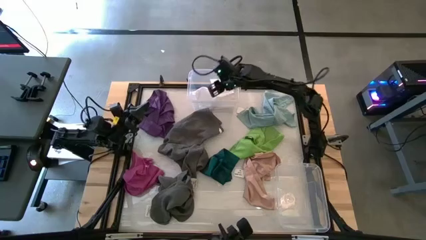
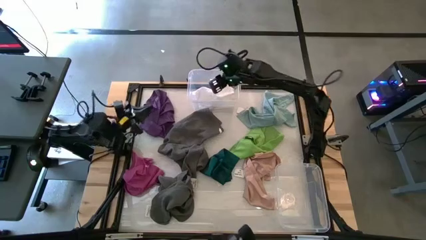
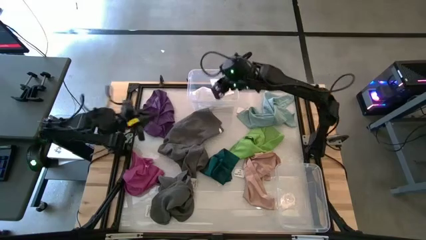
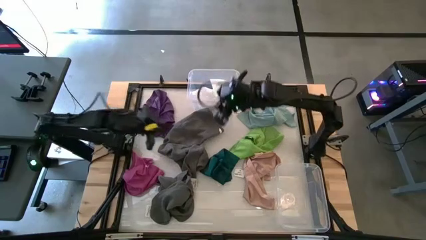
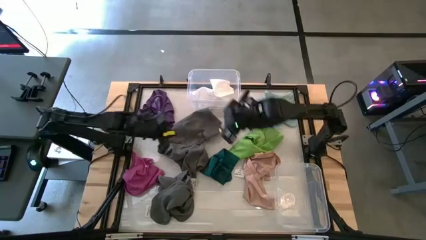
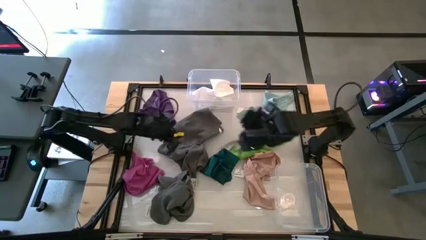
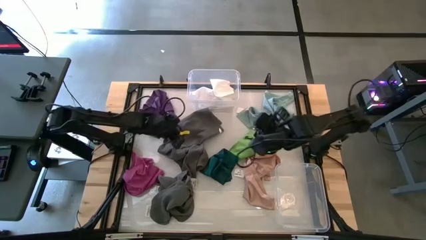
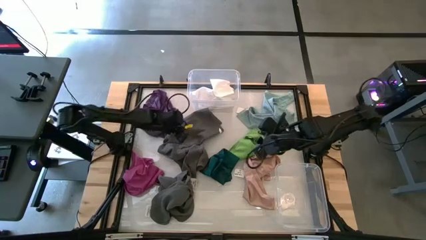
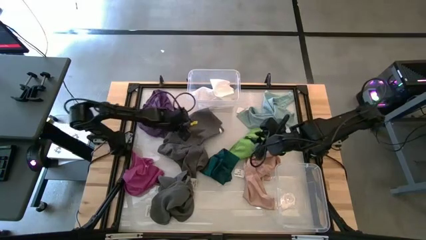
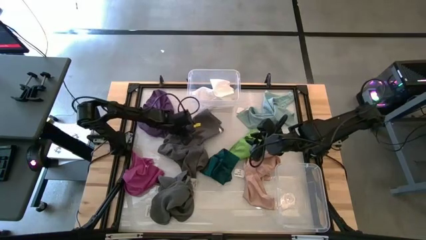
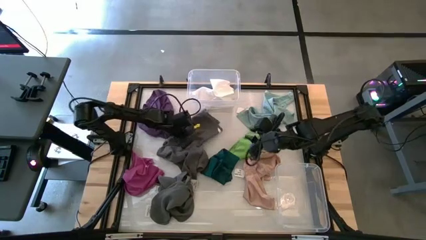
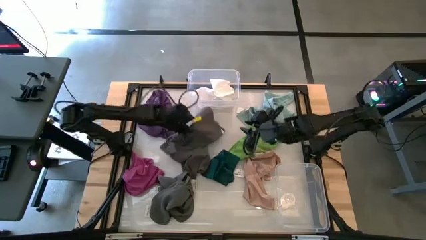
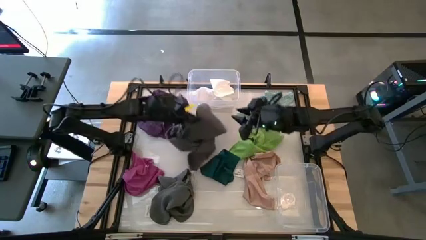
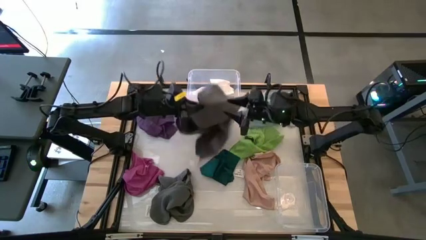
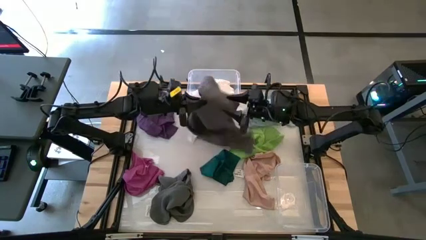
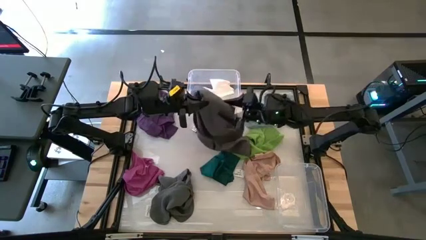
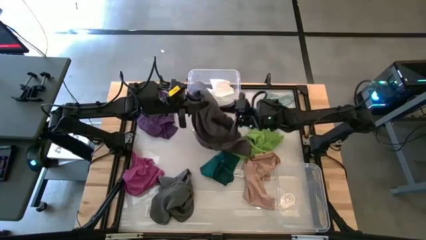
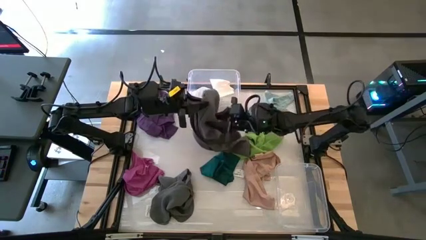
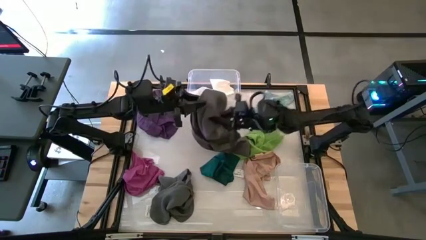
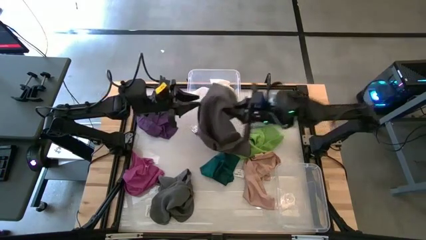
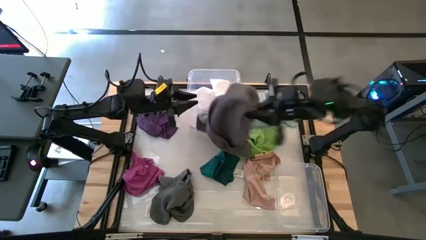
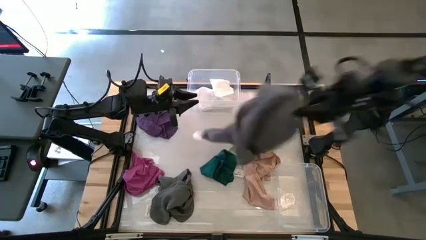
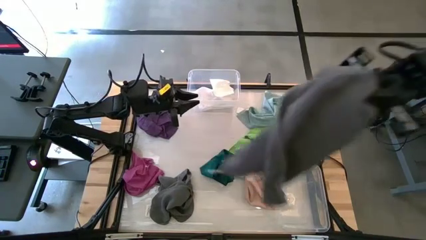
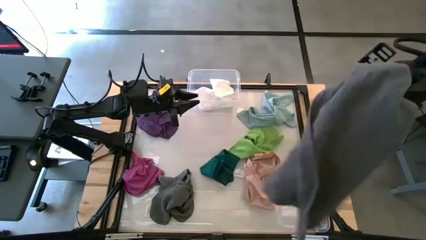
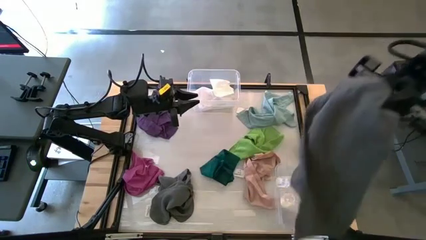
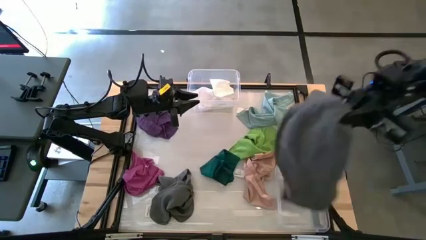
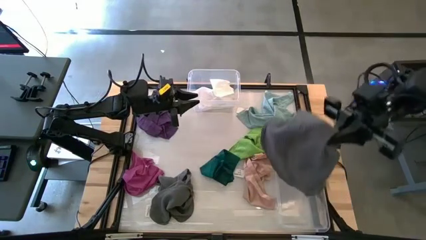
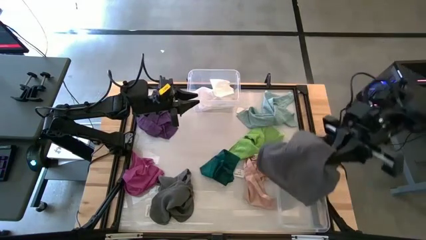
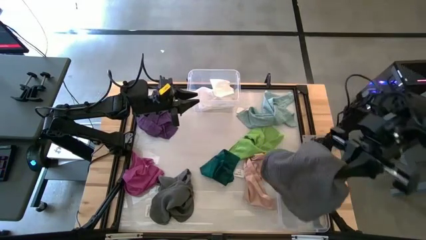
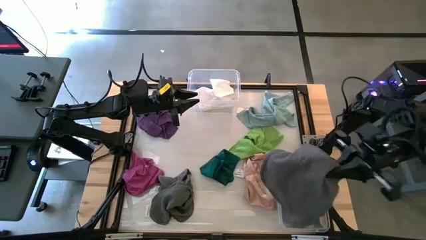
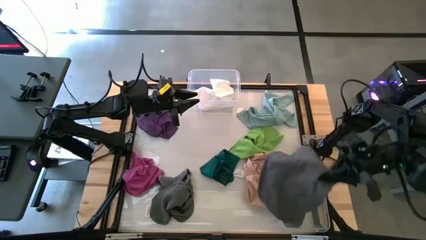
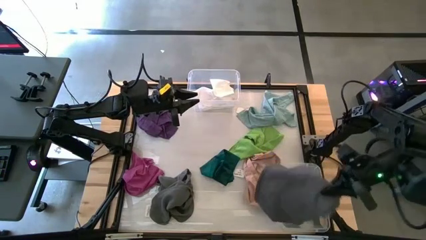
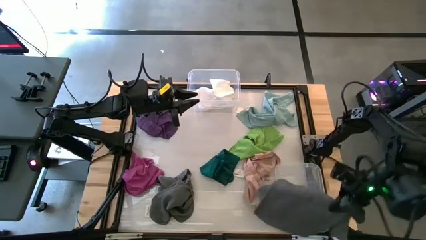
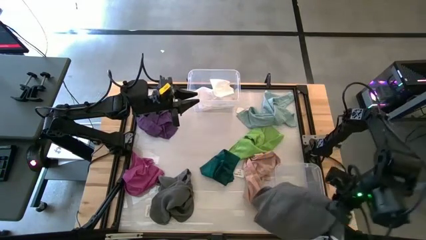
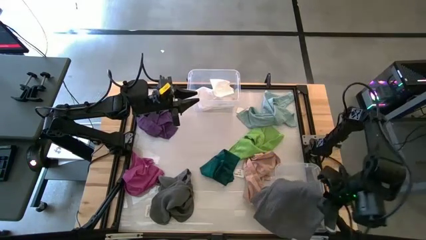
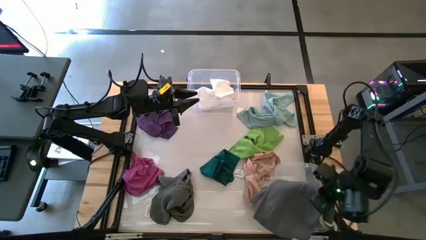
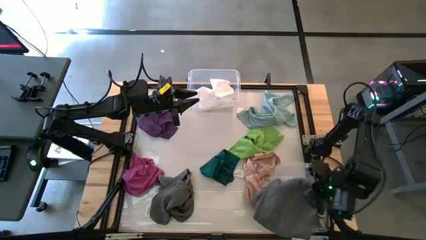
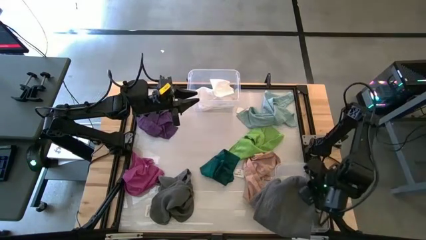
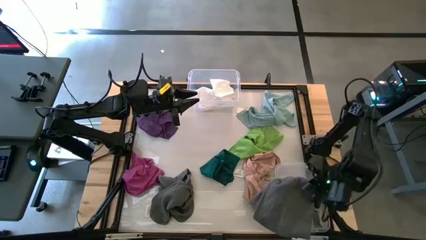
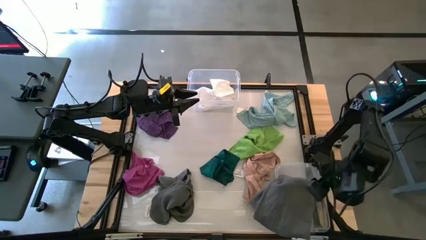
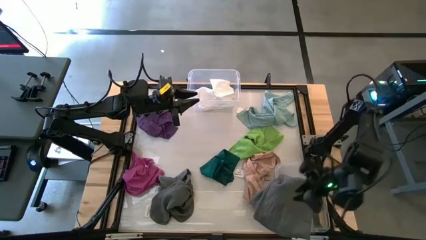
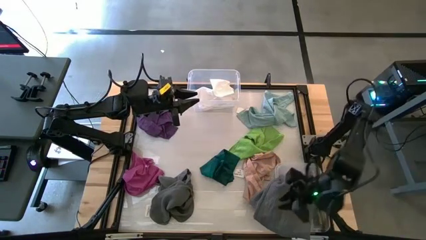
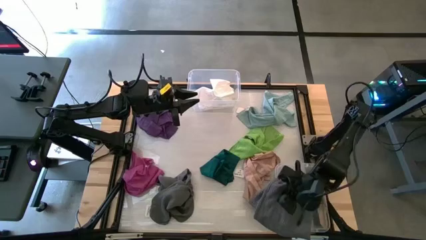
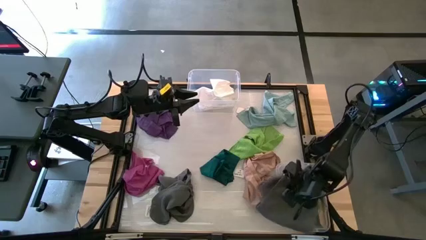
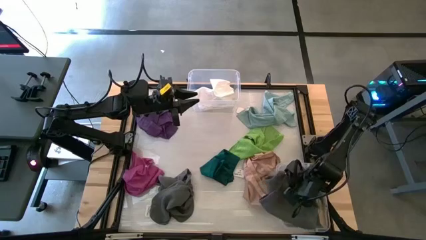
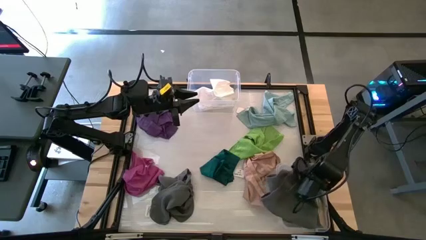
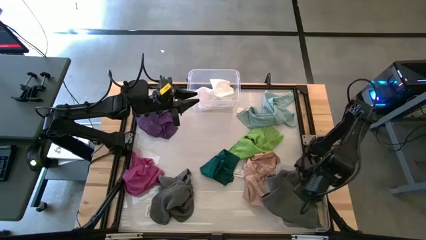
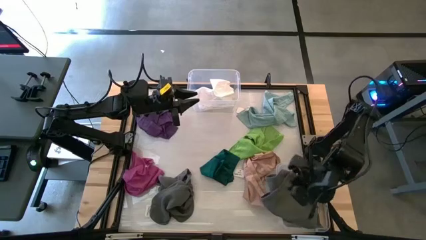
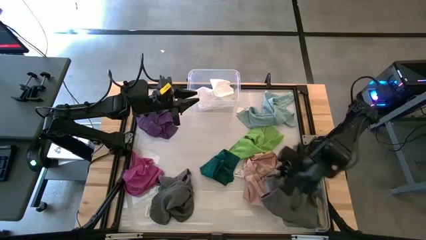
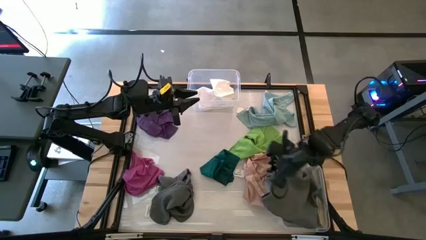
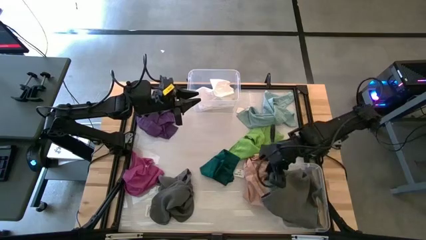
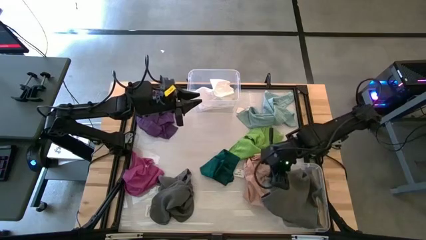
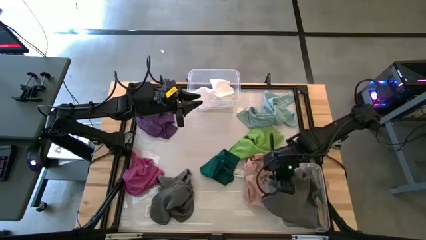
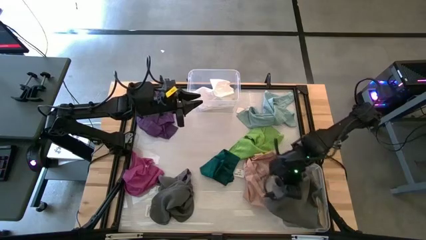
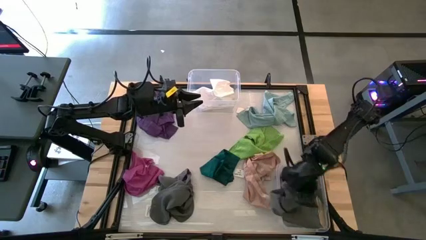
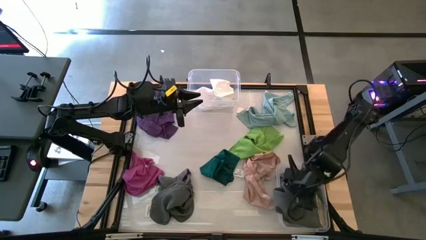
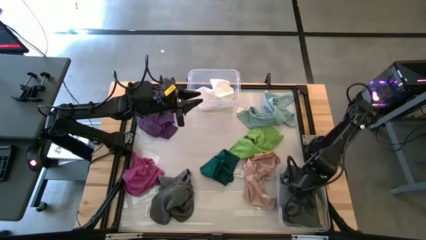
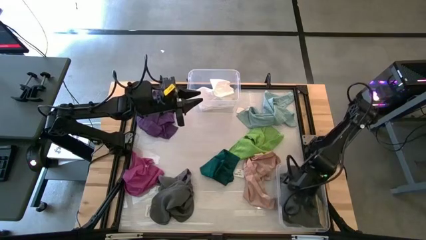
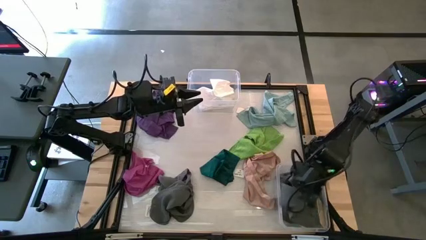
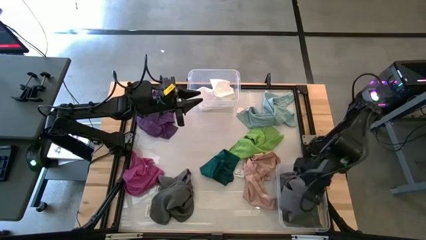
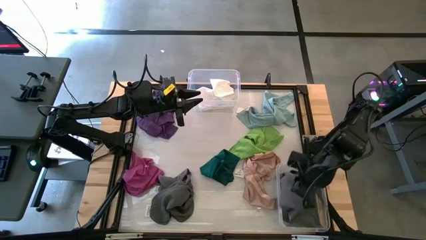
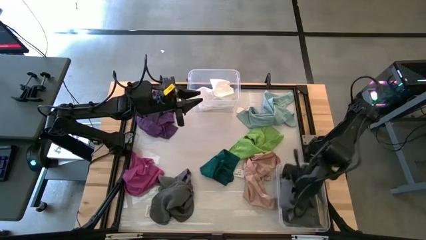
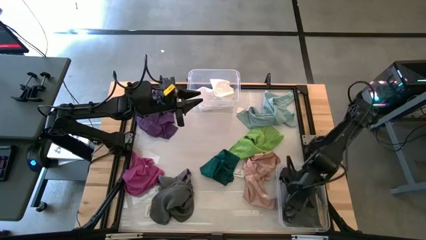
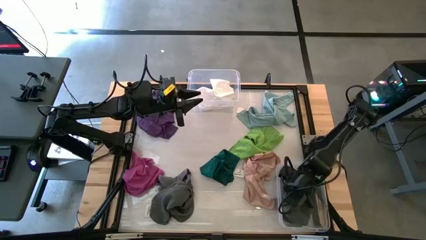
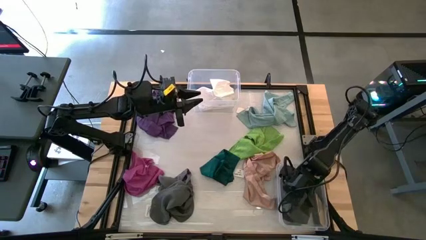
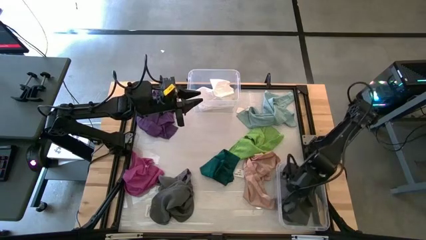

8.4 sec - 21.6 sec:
Task: Sort towels by color in basket
Put the top gray towel into the transparent bottom bin
